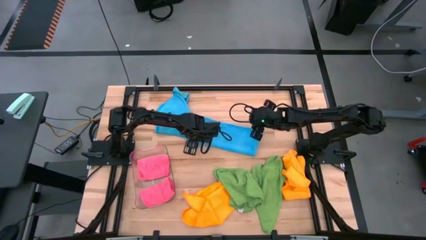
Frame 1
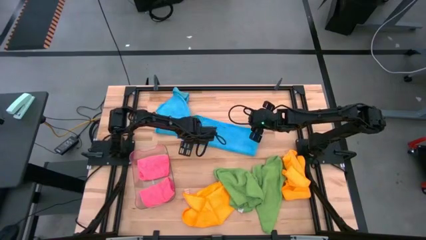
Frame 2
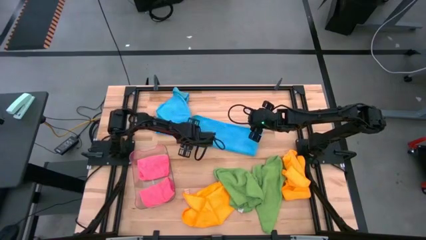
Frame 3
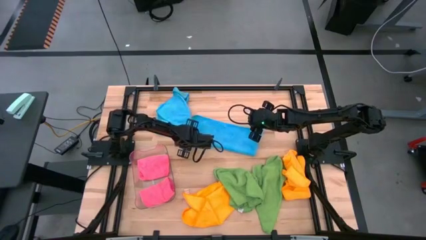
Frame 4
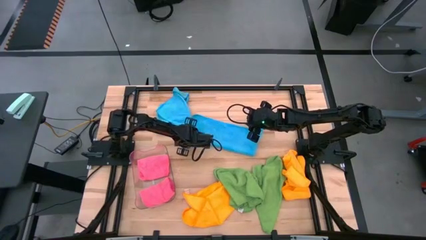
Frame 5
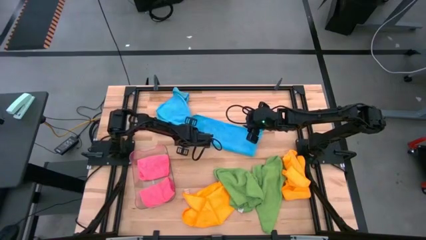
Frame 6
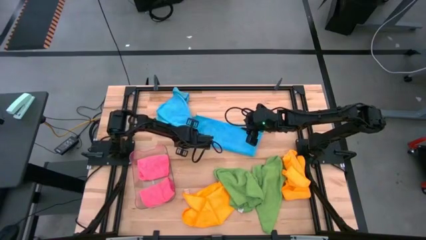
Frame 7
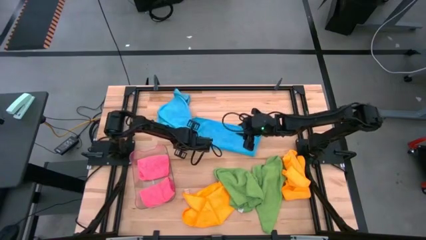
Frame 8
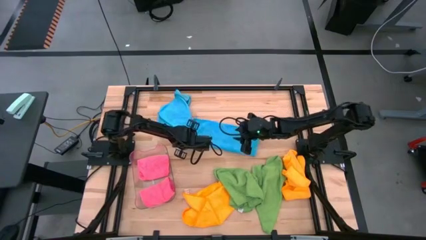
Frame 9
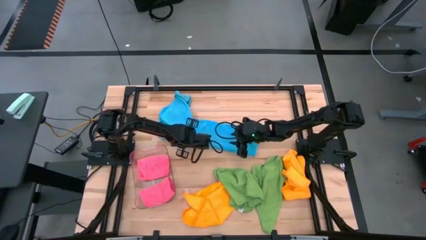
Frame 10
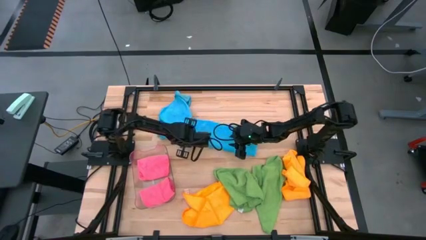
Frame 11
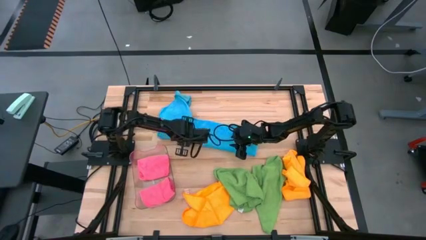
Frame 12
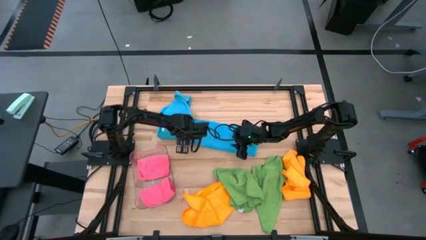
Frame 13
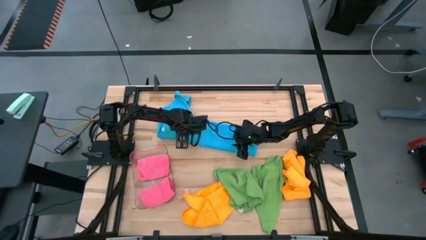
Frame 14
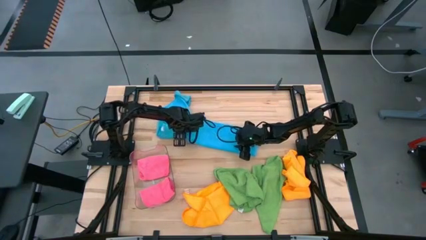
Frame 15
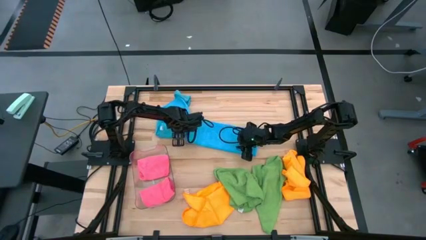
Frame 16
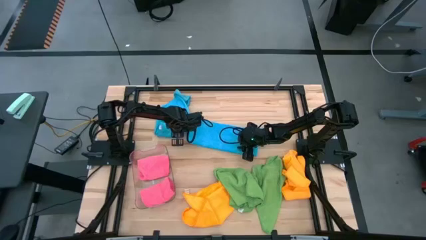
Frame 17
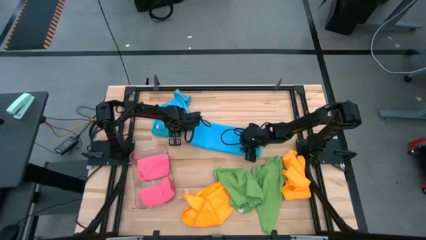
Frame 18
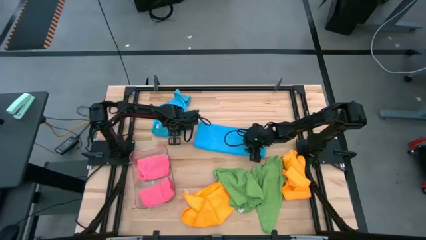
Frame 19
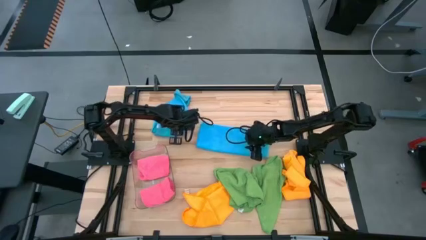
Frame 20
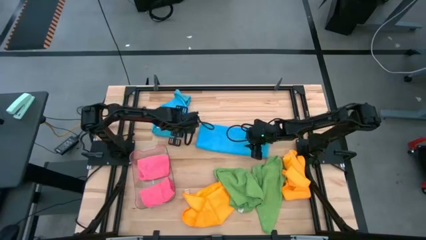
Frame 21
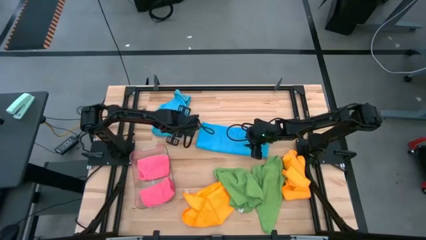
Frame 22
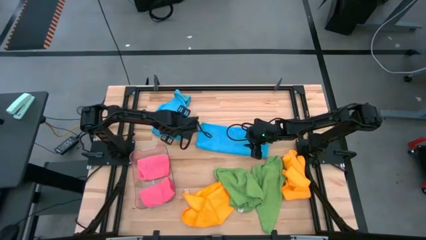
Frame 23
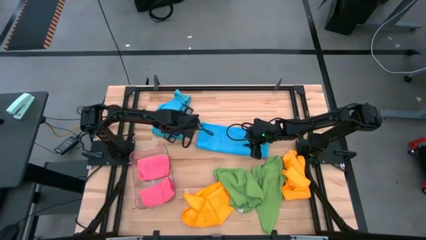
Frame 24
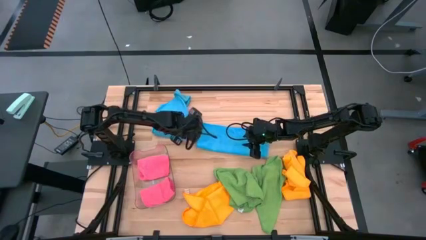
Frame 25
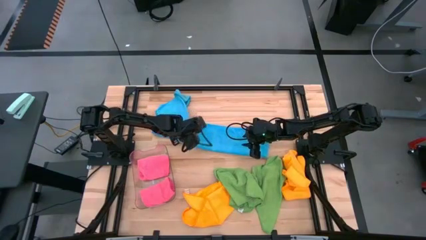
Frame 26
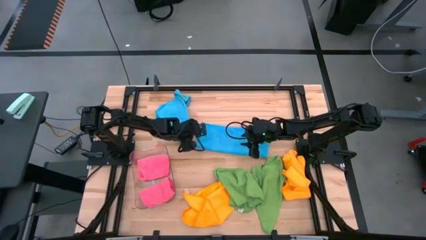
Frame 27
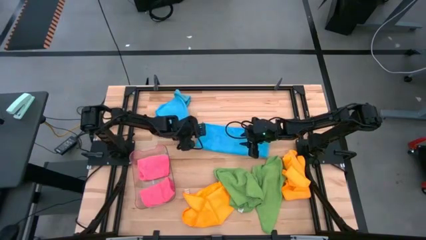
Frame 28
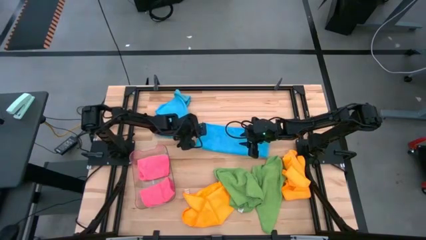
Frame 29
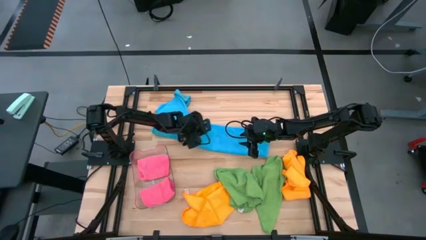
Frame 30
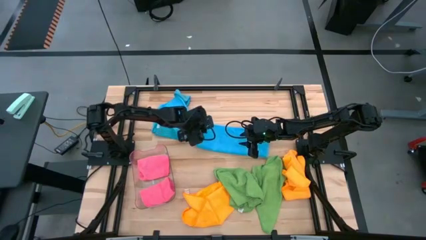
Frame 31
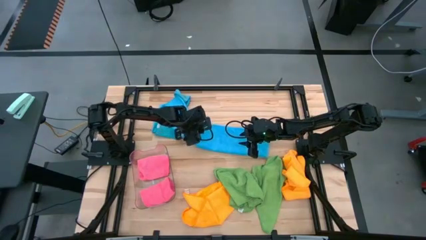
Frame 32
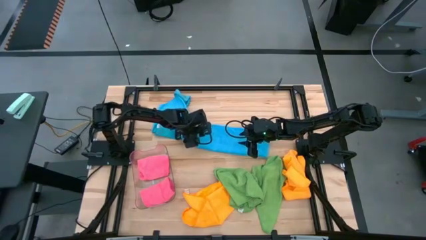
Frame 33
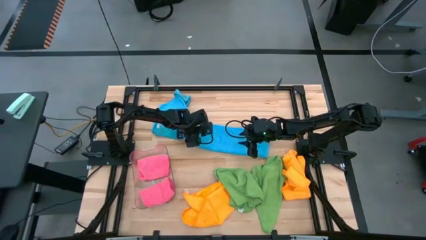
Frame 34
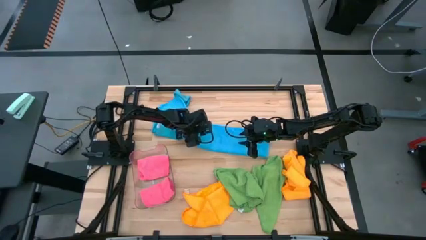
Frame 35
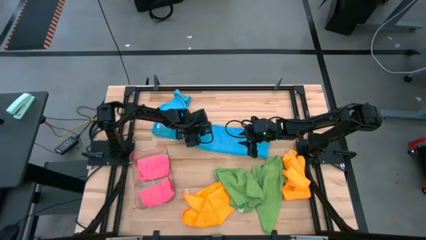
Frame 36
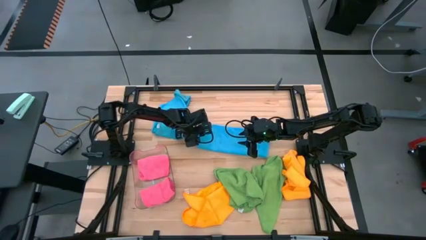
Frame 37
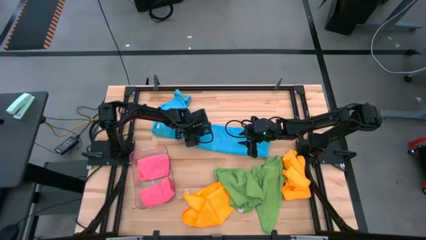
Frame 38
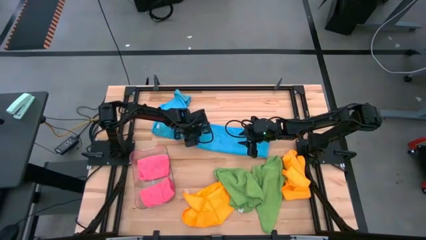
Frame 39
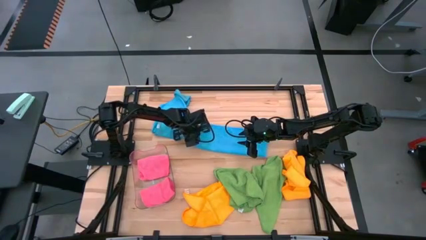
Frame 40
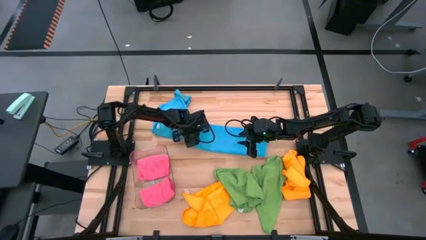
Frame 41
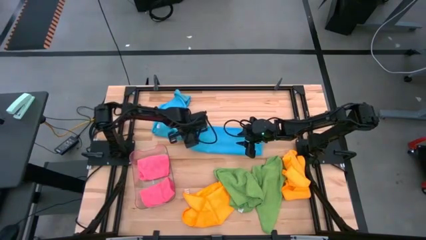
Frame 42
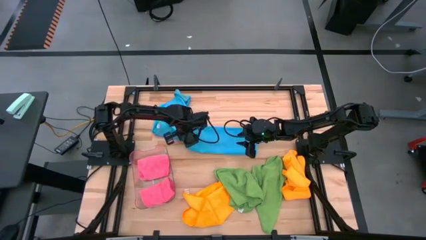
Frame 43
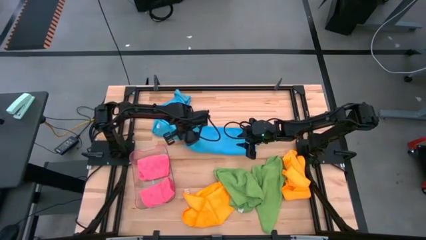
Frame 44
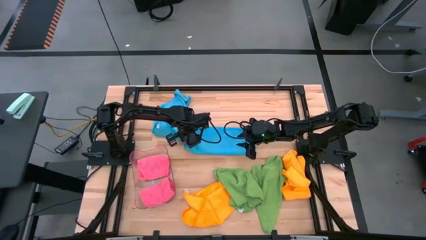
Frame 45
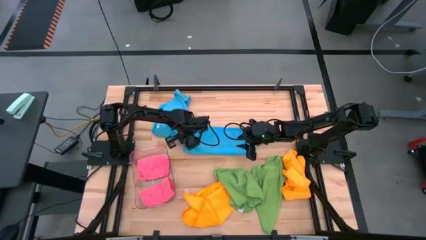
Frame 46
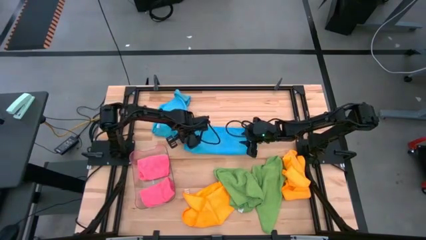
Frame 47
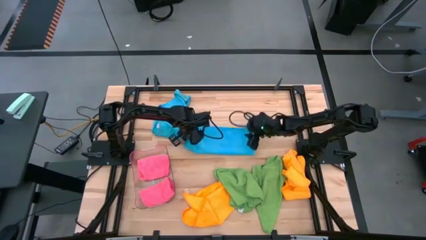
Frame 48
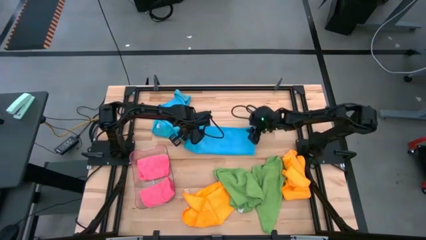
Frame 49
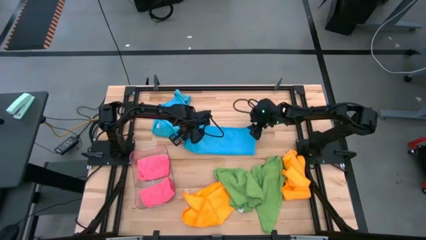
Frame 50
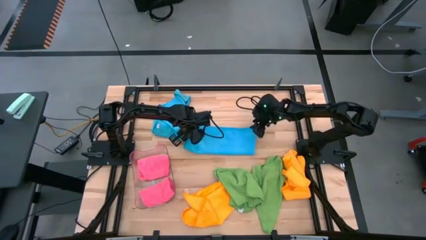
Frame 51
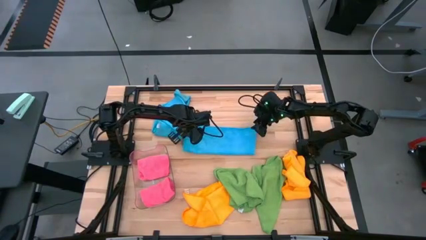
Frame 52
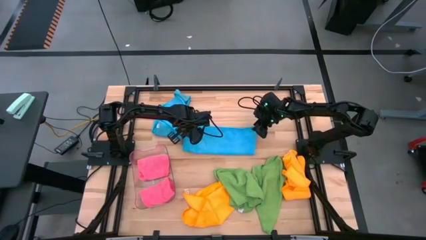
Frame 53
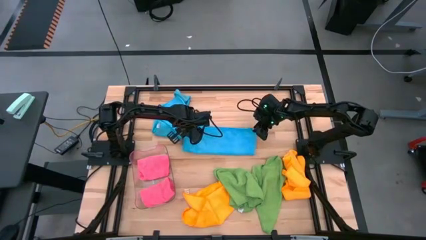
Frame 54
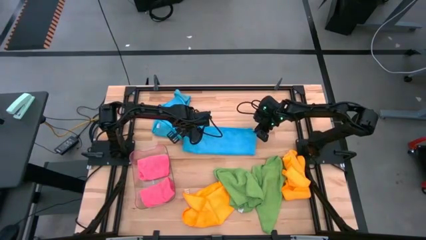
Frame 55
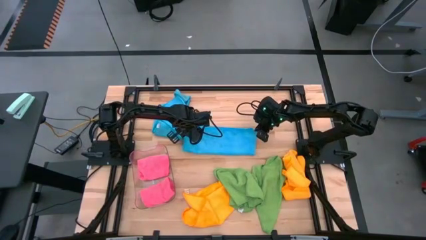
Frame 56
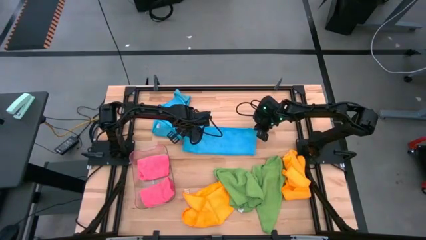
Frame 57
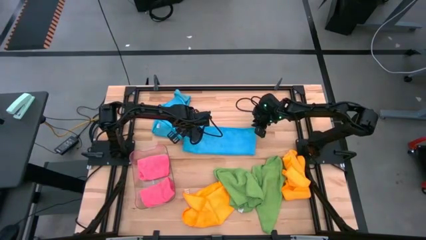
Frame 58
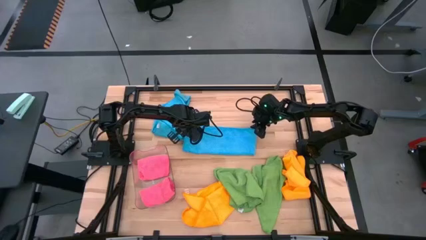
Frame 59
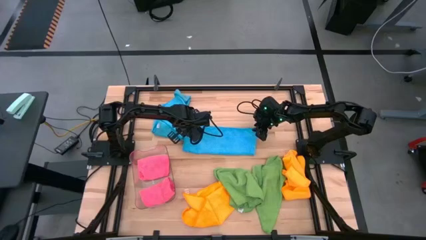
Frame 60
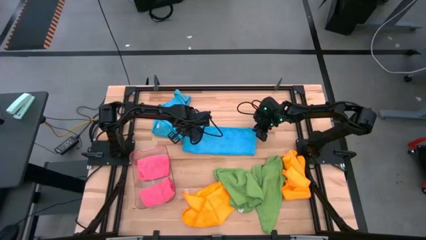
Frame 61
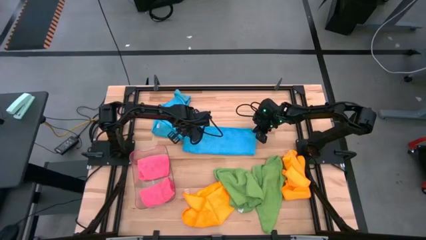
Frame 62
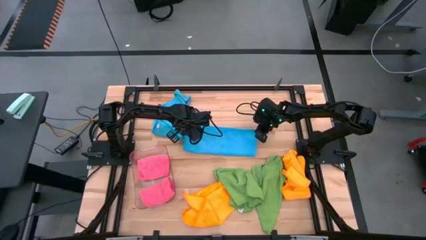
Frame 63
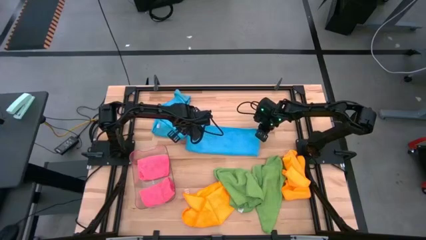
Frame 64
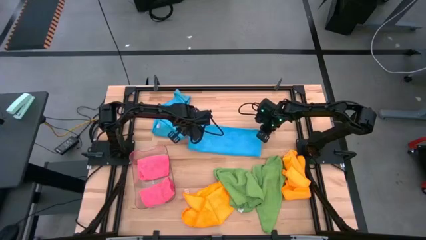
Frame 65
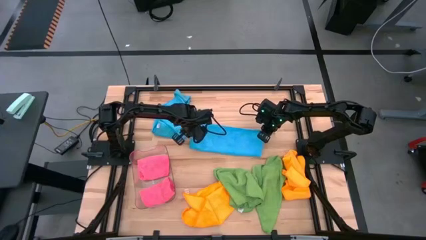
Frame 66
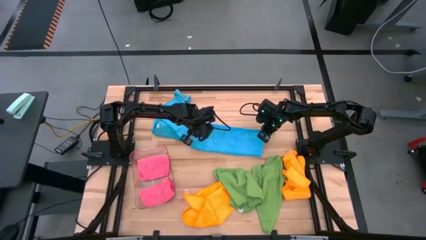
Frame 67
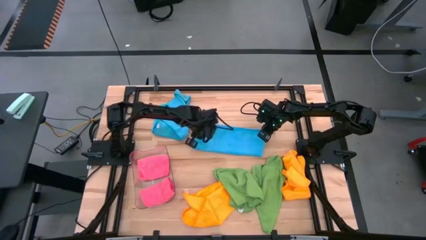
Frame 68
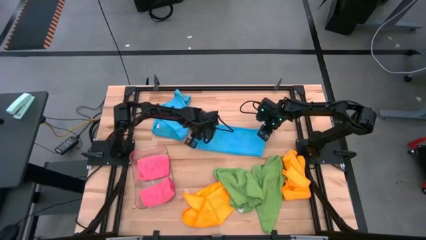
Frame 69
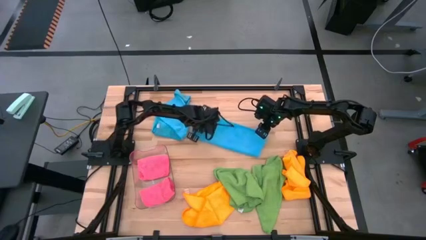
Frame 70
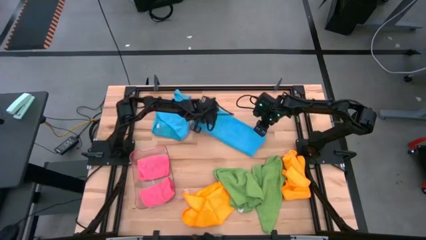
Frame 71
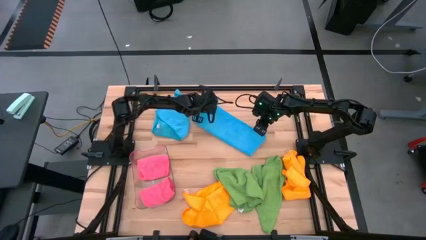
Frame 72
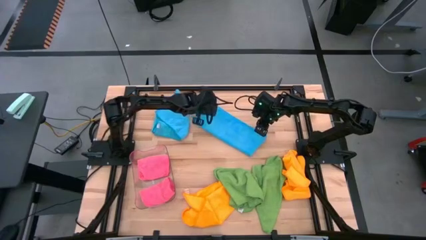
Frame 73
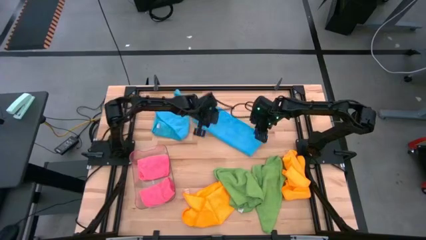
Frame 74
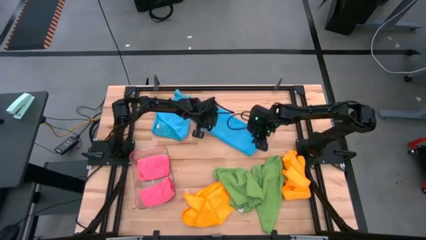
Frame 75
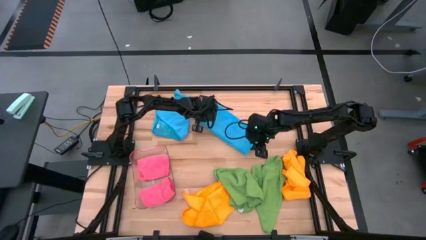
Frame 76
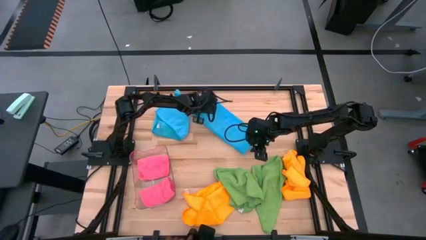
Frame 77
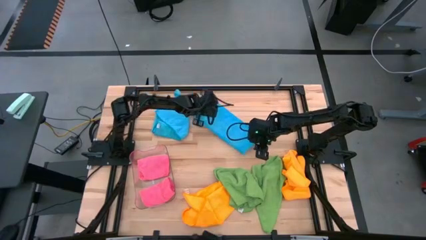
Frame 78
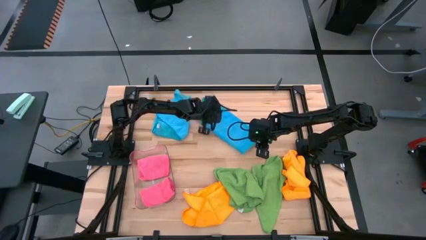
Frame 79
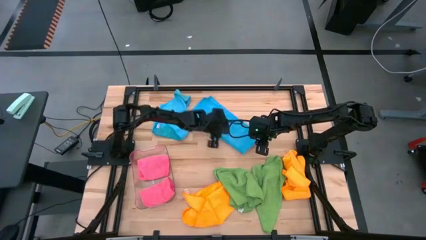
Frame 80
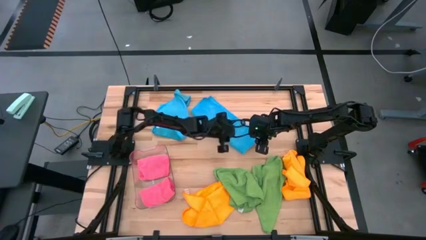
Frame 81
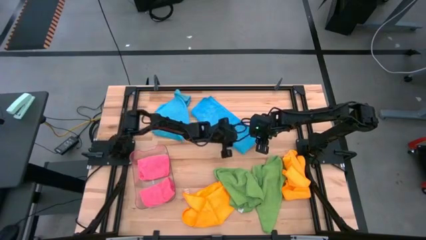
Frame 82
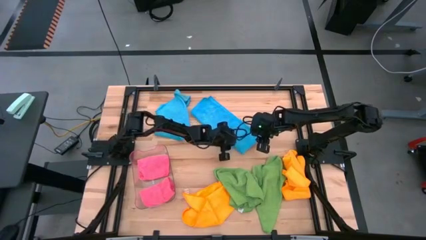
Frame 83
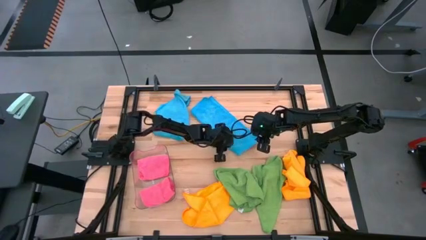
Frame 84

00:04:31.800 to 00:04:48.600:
Task: Fold microfiber towels
Fold the bottom blue microfiber cloth
